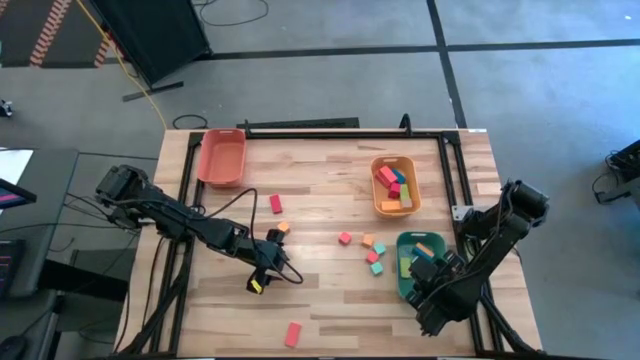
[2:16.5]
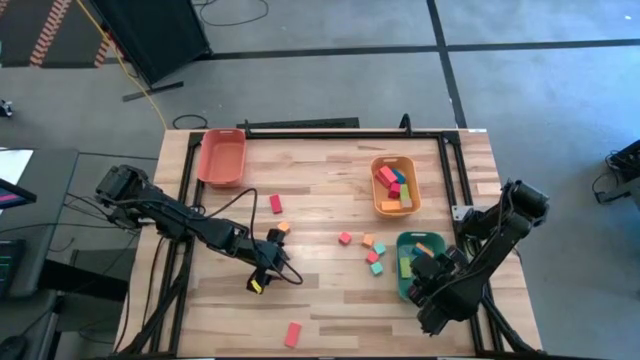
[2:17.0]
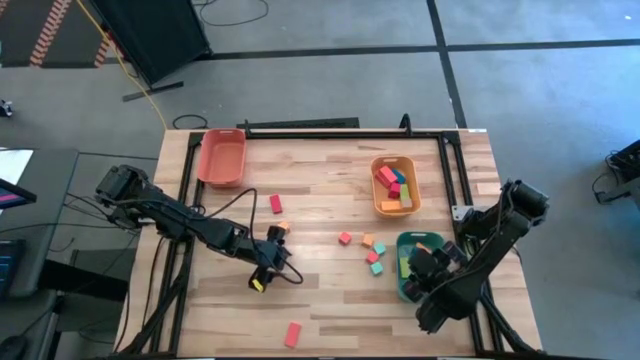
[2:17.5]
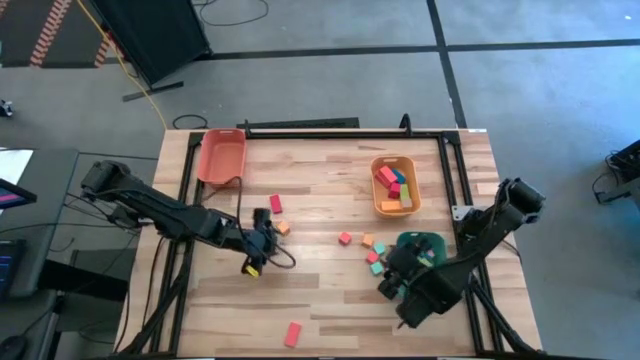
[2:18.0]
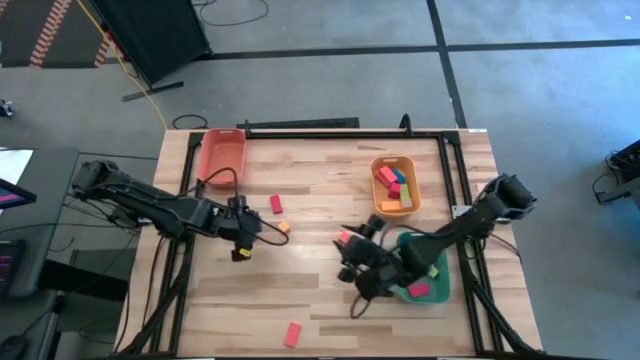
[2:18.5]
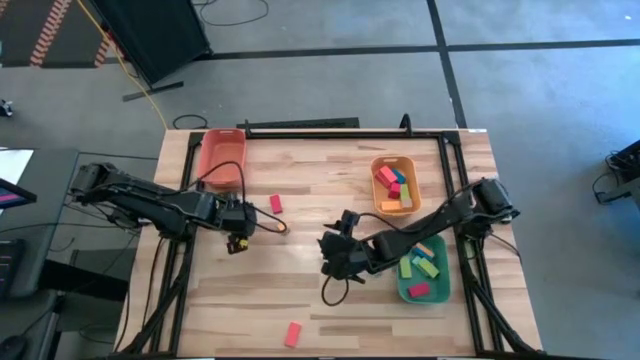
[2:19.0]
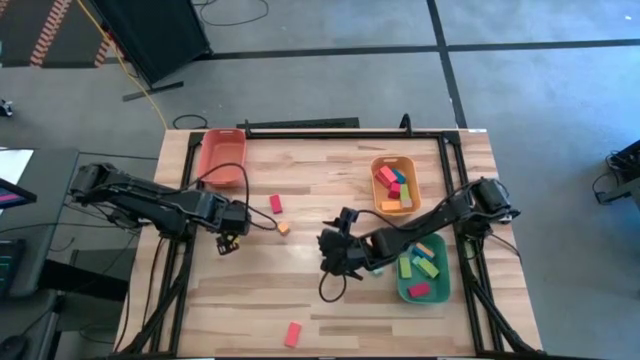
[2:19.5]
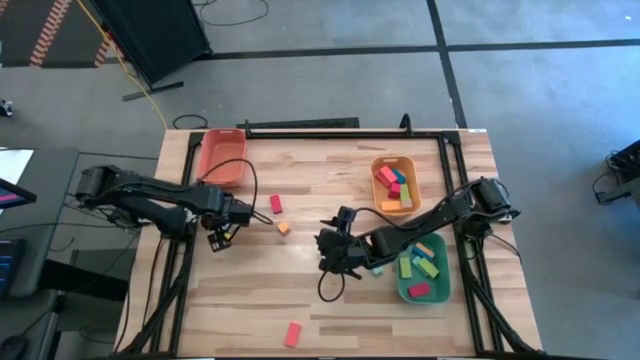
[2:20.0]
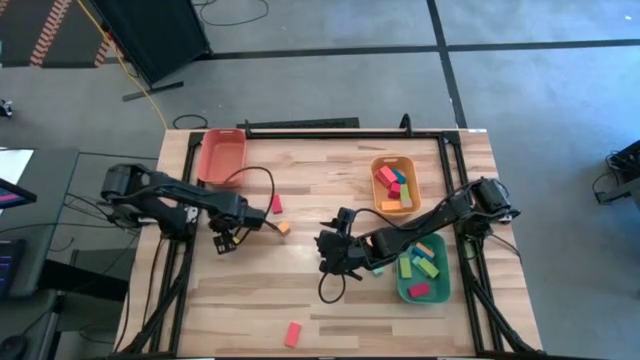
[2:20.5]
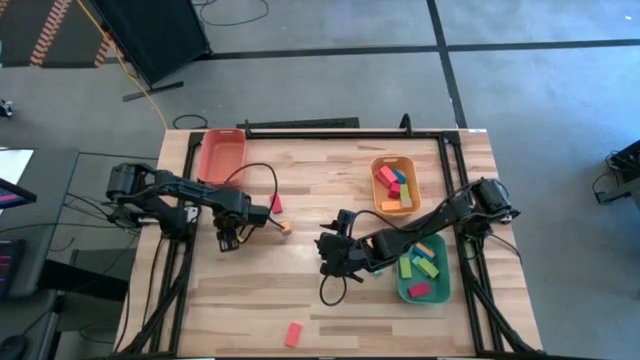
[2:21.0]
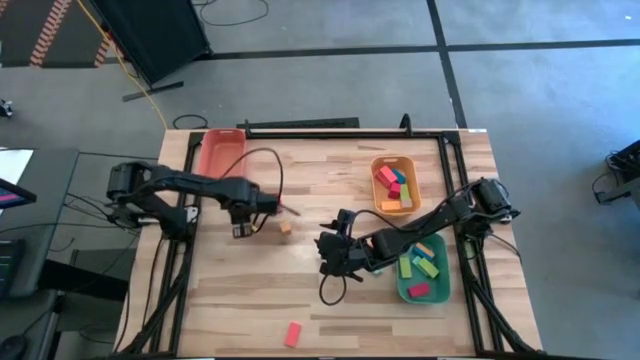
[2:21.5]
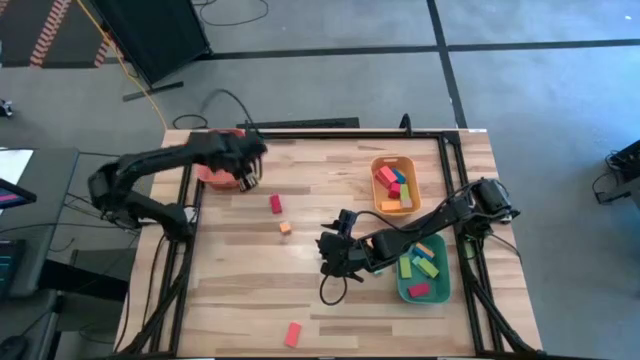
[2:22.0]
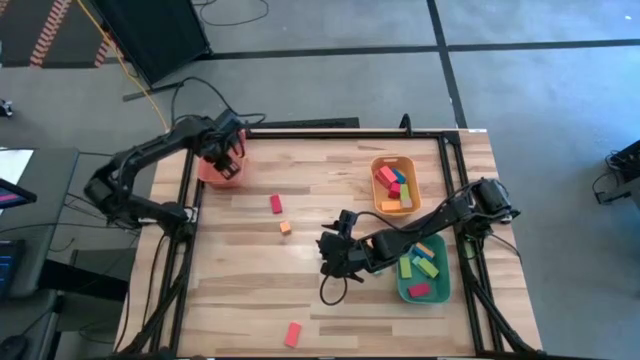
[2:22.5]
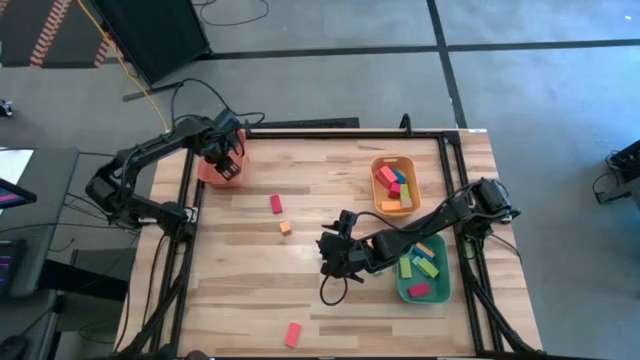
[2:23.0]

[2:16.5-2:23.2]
Task: Sort blocks by size
Put the top square blue block into the orange bin

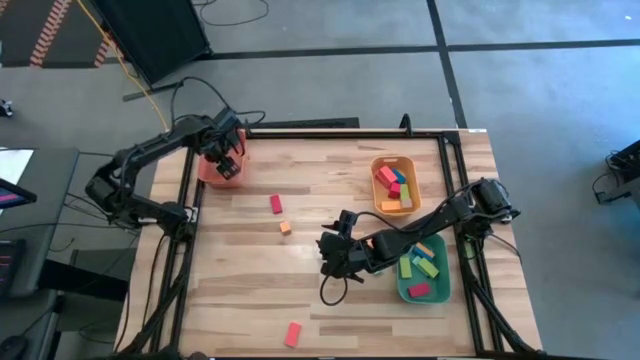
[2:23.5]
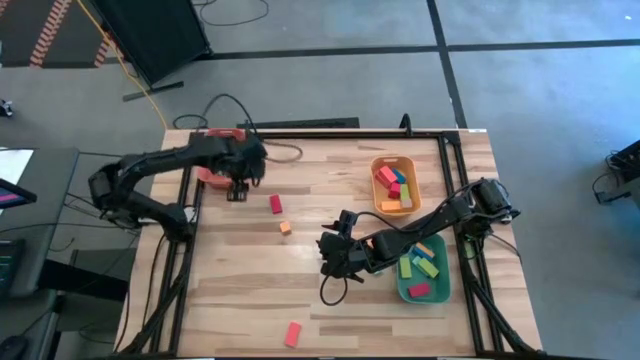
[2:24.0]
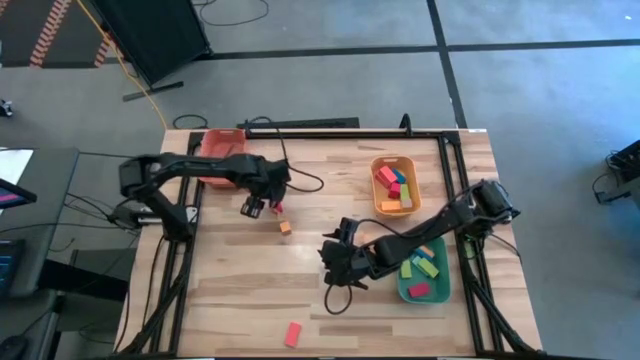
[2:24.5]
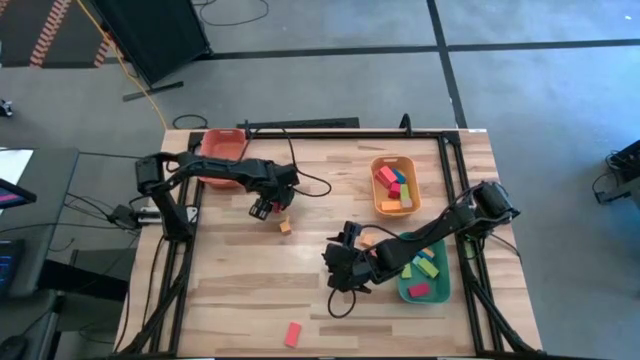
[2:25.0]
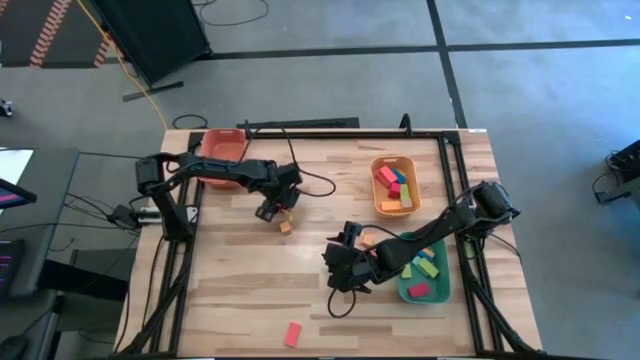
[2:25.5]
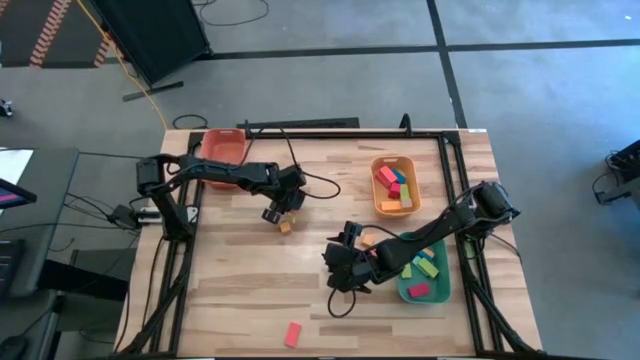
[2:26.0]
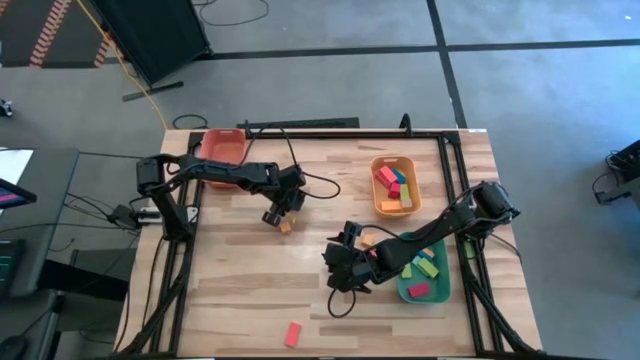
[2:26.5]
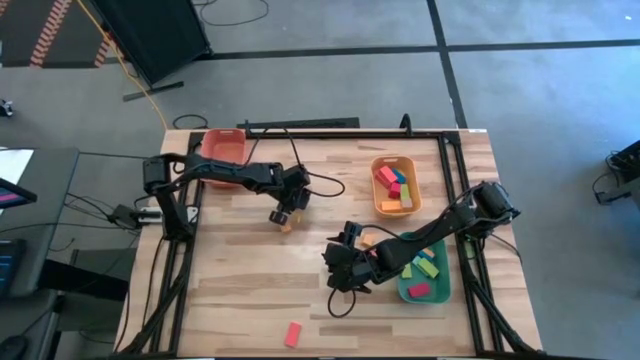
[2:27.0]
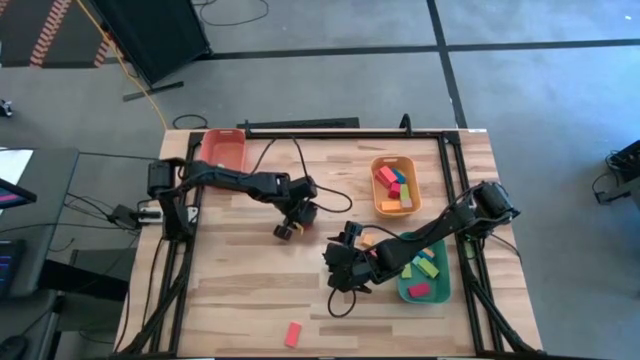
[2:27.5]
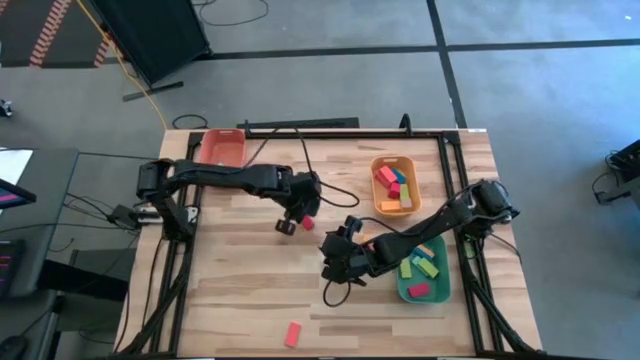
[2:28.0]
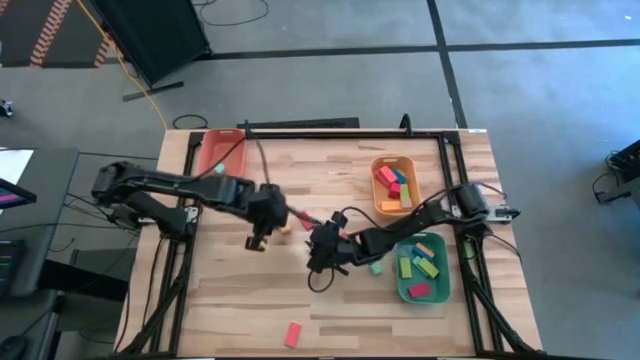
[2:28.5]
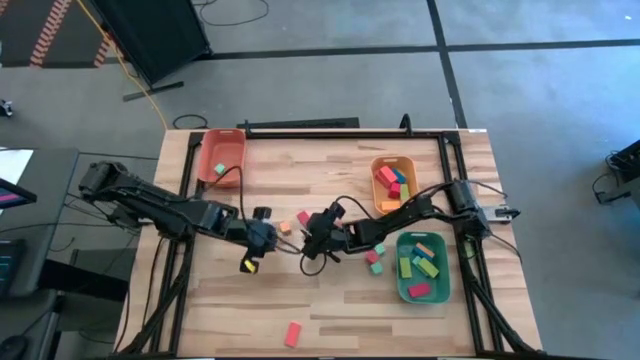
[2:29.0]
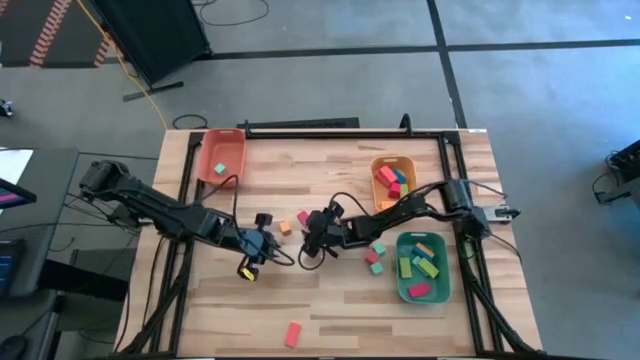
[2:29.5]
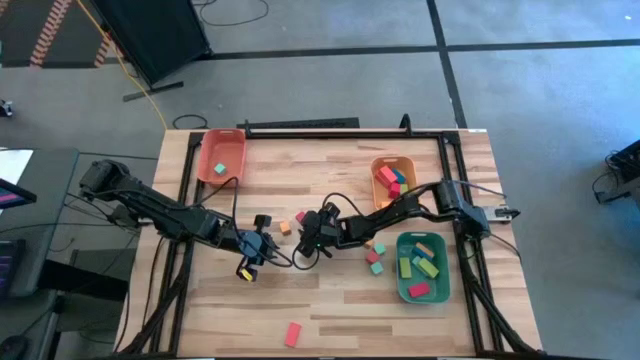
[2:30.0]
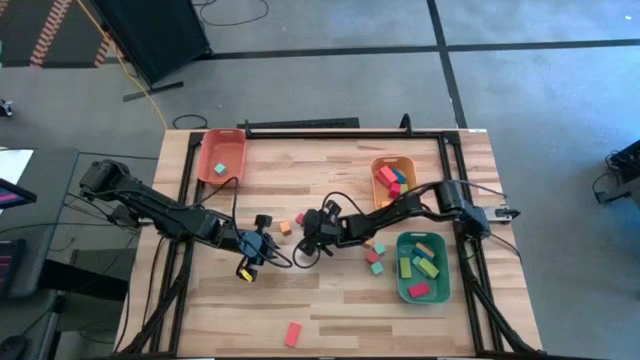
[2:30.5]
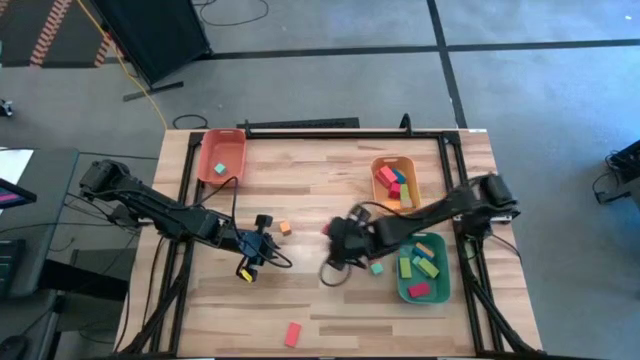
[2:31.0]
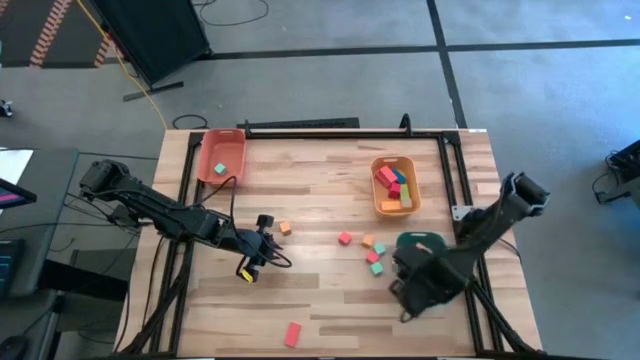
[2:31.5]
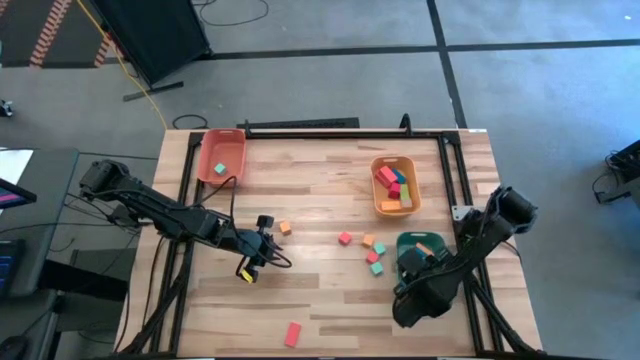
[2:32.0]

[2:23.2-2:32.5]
Put the small rectangular red block into the green bin

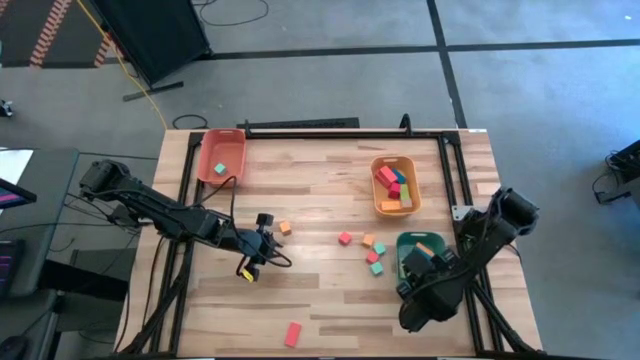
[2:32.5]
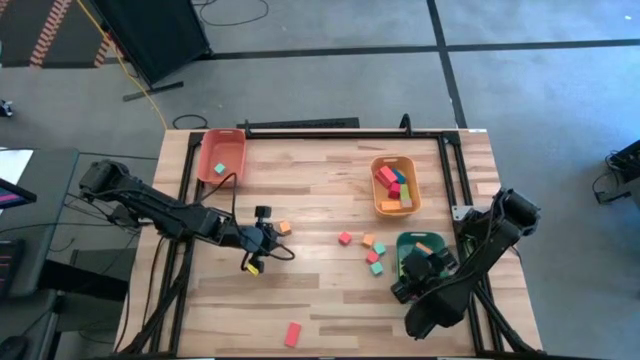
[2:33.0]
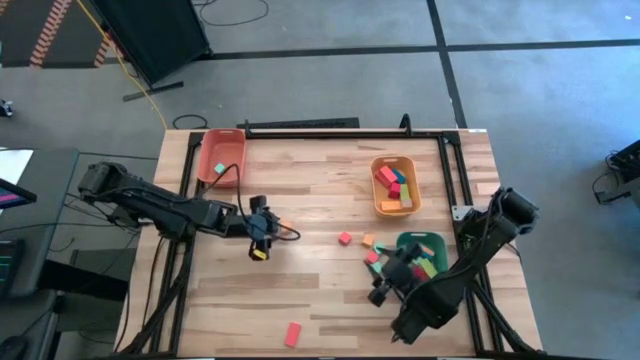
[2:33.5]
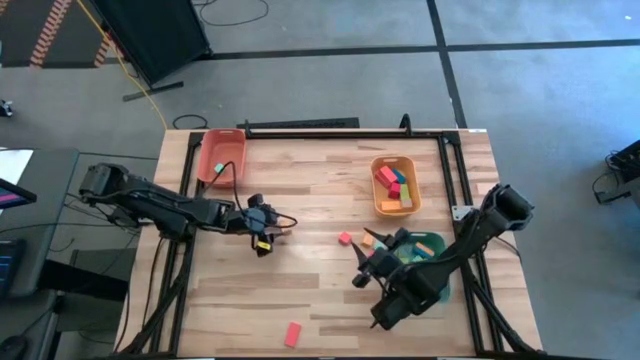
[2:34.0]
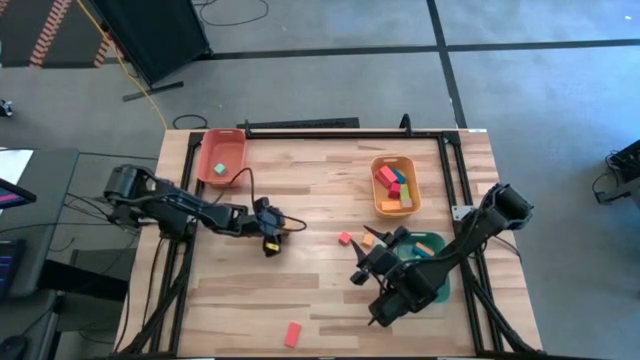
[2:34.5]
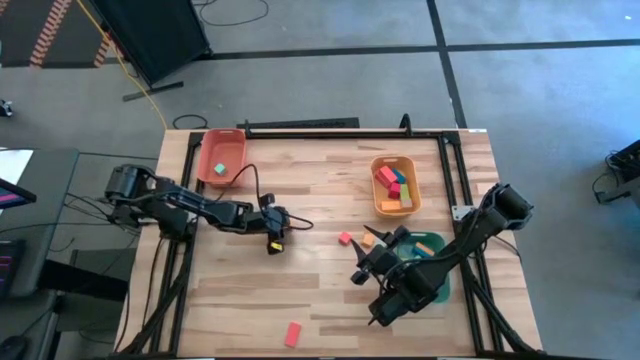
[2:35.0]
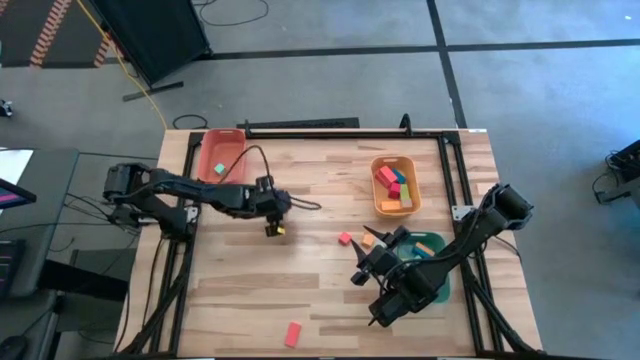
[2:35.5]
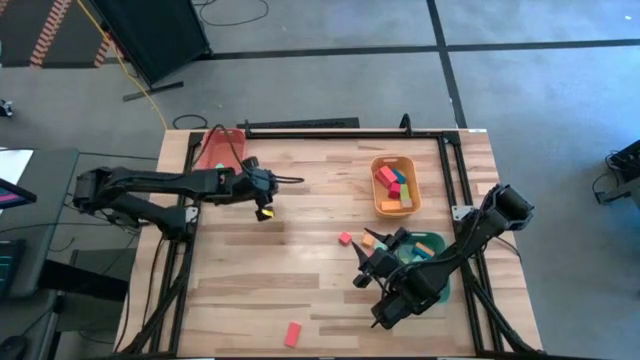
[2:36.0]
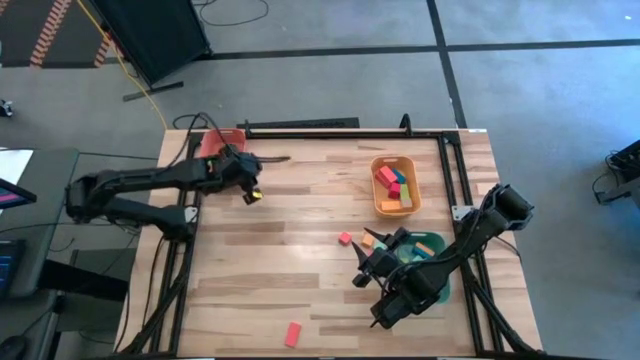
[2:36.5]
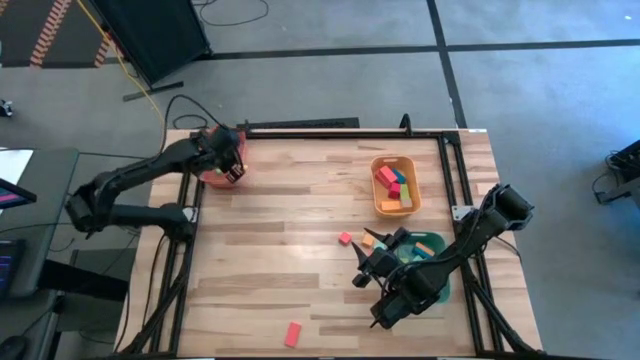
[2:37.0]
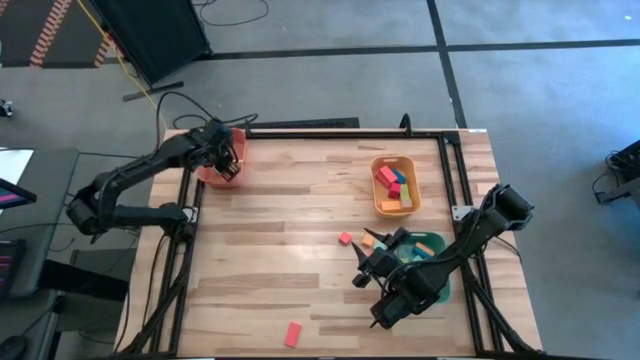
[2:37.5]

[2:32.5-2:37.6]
Put the left square yellow block into the orange bin
